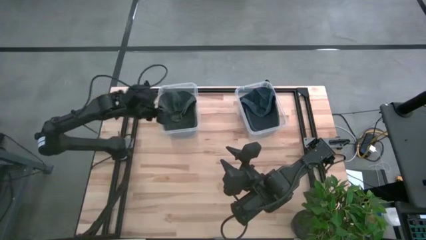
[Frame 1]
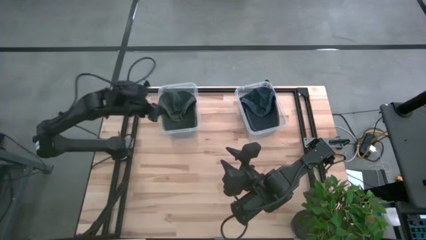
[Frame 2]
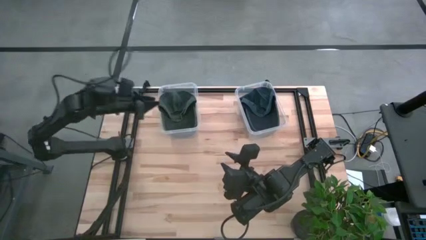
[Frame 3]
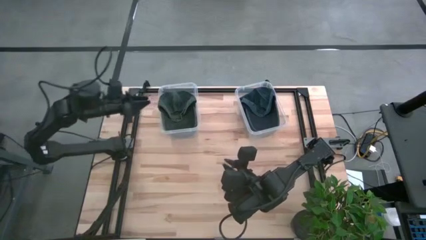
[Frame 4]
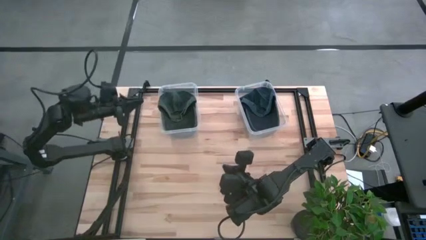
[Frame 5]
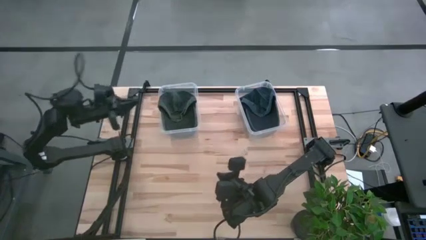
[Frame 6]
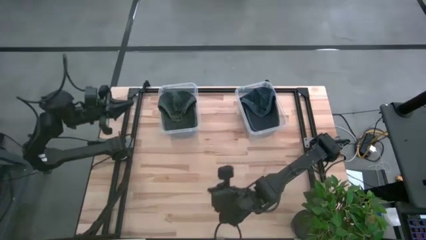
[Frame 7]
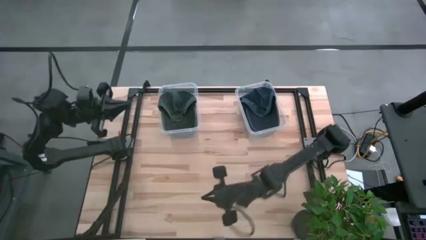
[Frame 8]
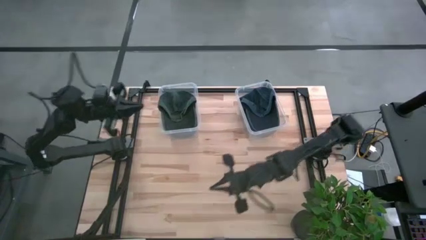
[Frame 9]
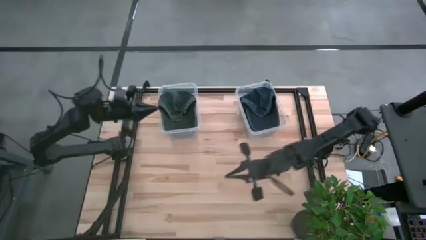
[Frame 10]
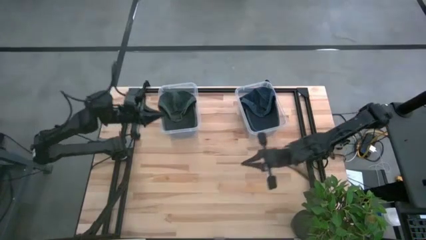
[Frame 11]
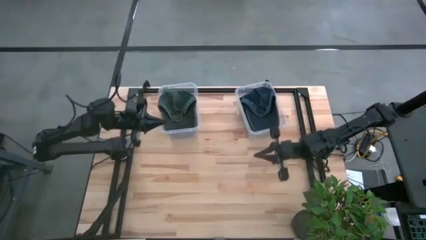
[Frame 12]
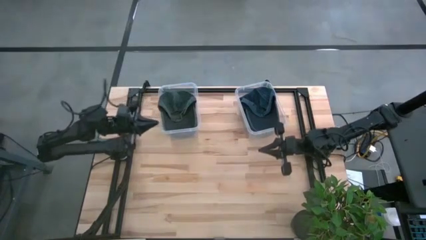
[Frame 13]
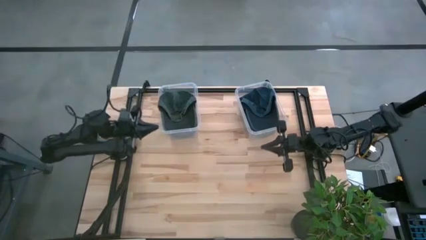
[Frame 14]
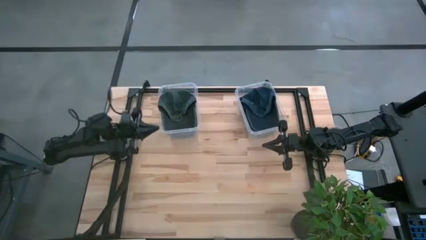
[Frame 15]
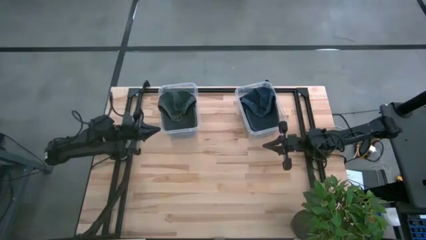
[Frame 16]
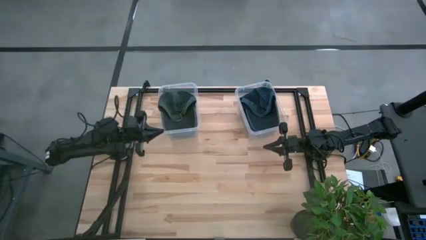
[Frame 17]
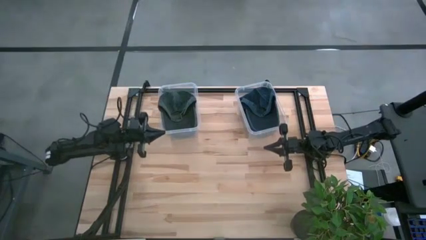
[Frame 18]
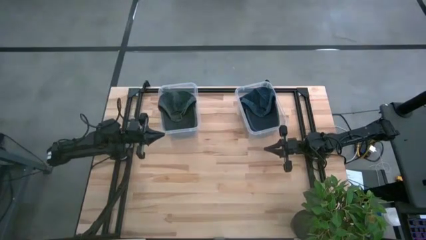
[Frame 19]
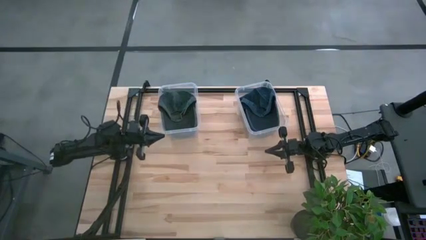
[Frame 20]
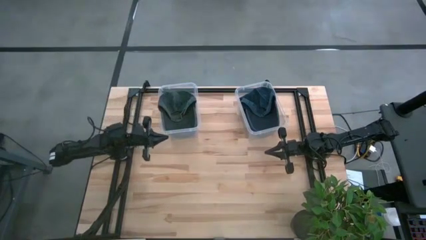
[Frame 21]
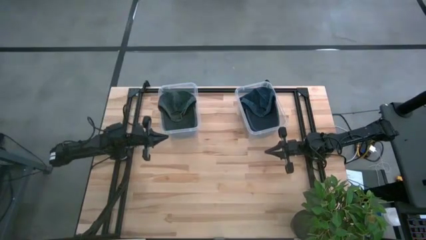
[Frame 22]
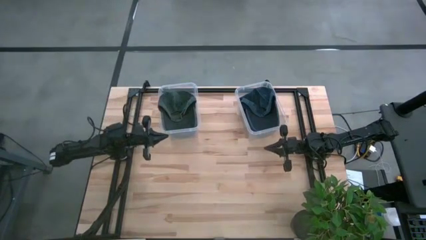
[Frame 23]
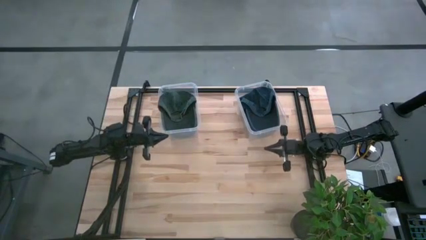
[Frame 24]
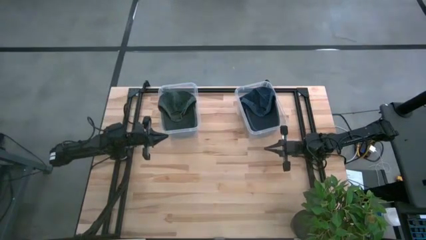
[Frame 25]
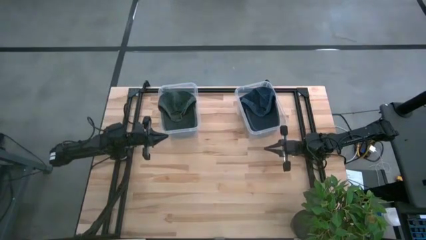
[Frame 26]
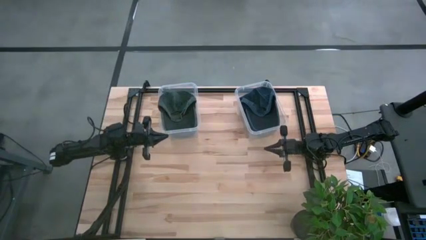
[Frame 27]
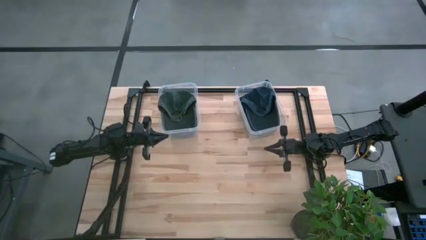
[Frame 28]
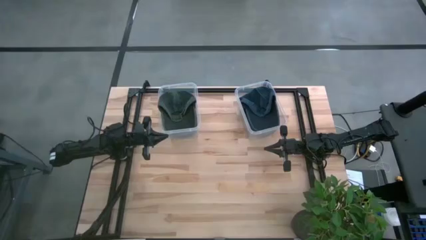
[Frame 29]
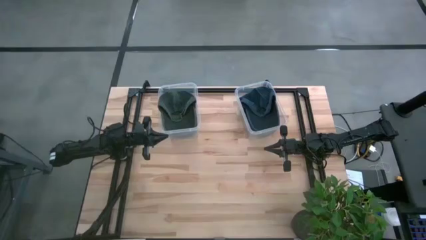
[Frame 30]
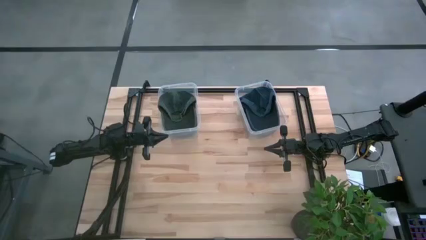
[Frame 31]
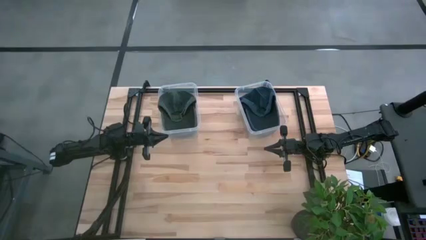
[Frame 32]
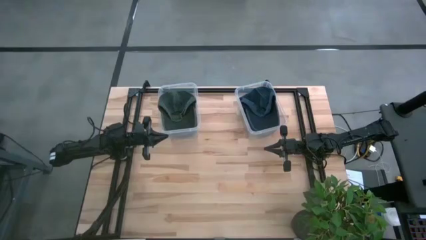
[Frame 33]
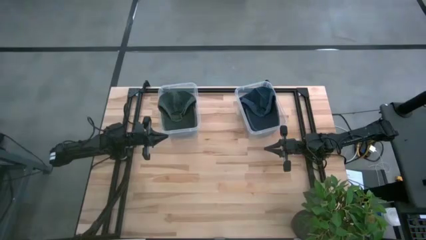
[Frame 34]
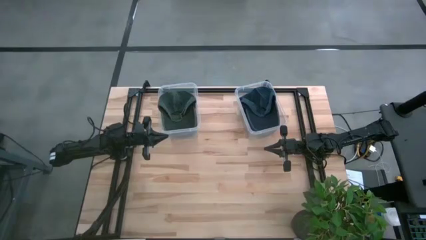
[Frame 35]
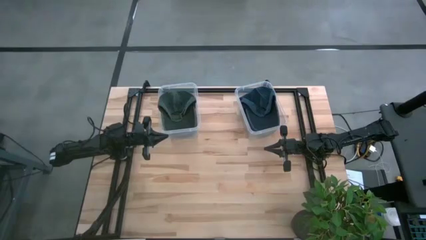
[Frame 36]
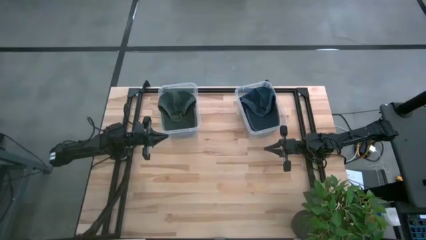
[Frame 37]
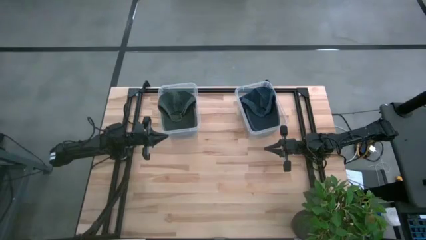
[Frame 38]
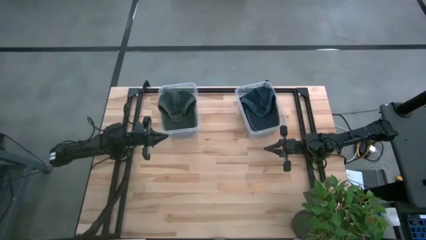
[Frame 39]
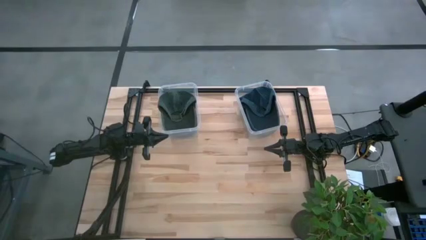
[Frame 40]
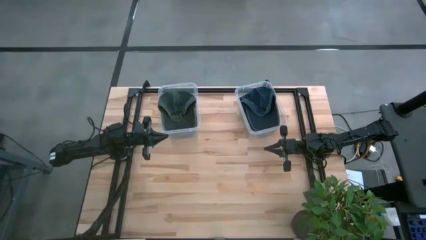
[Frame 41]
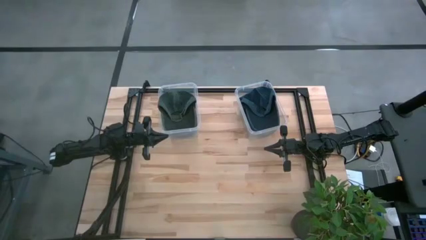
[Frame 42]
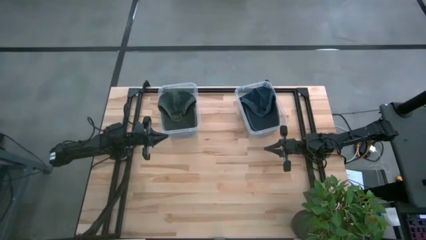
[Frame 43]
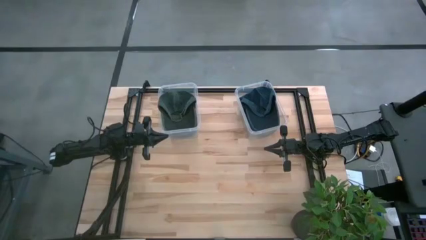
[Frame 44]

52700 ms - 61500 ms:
Task: Pick & Place hat
Return to Home Position

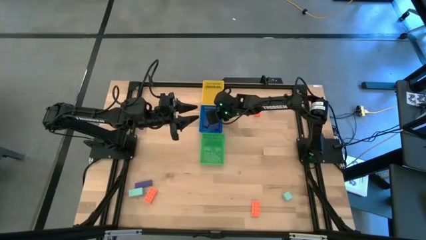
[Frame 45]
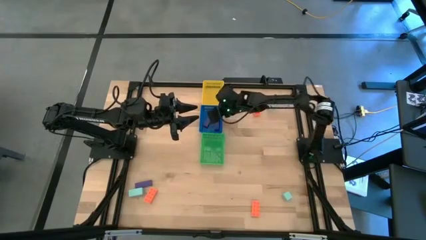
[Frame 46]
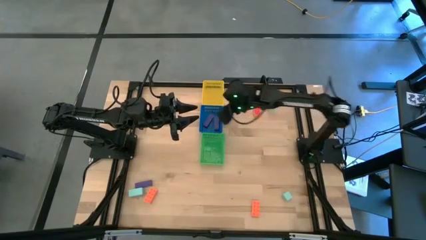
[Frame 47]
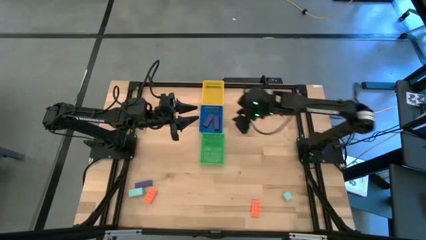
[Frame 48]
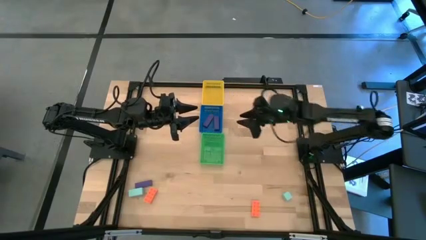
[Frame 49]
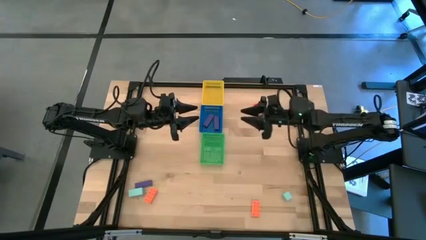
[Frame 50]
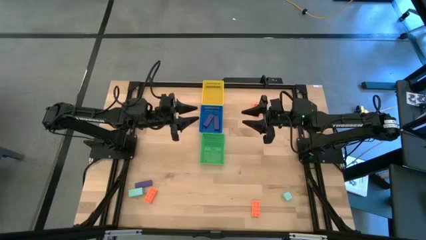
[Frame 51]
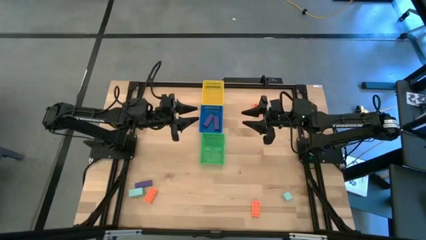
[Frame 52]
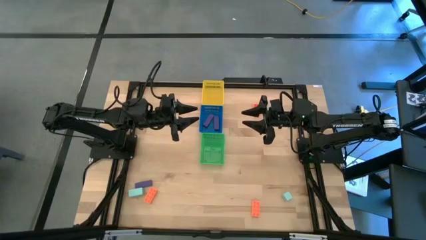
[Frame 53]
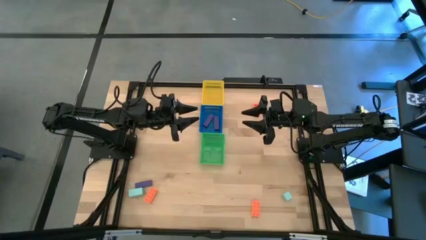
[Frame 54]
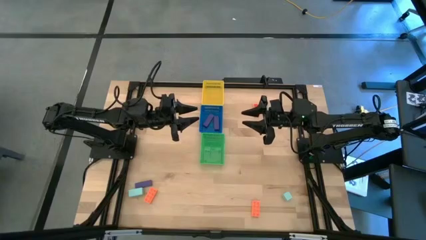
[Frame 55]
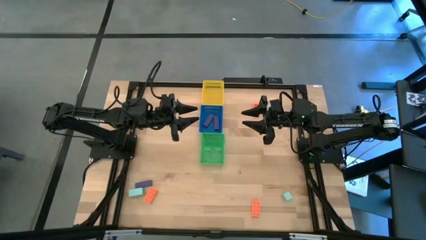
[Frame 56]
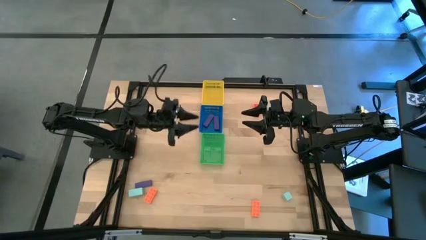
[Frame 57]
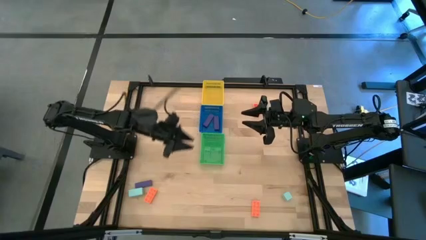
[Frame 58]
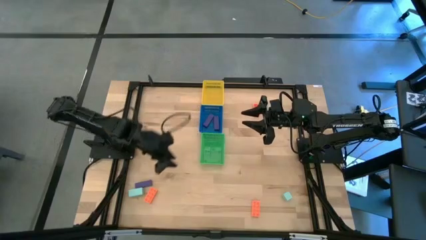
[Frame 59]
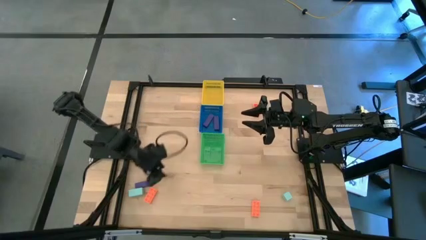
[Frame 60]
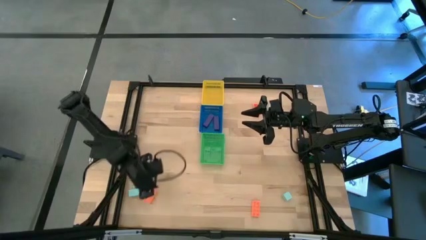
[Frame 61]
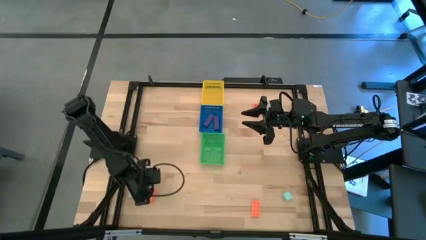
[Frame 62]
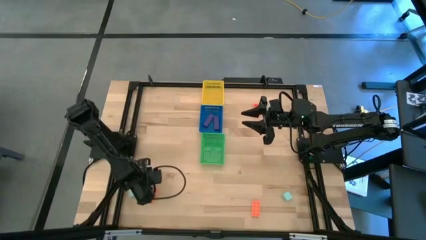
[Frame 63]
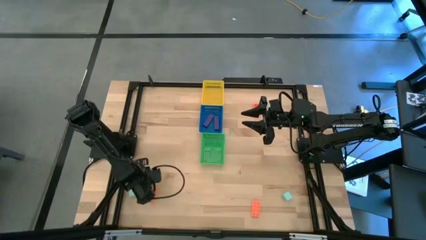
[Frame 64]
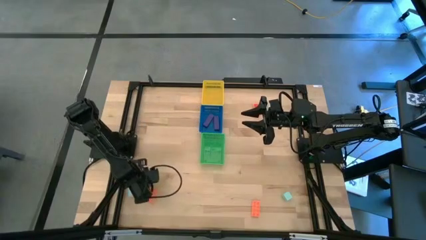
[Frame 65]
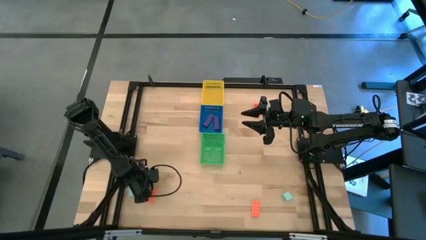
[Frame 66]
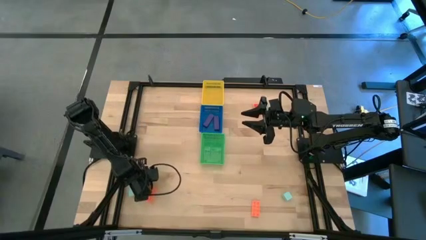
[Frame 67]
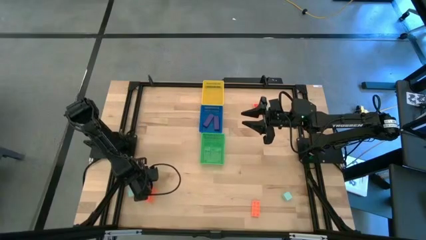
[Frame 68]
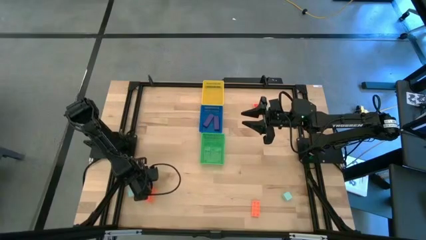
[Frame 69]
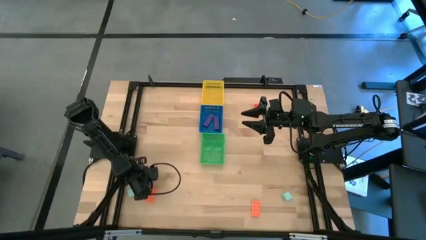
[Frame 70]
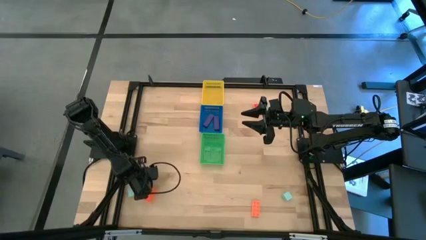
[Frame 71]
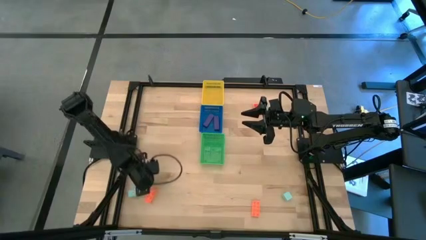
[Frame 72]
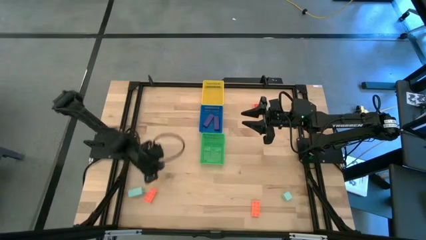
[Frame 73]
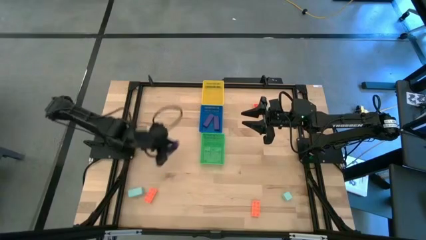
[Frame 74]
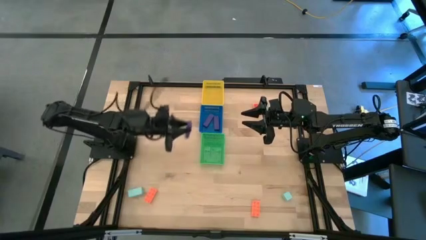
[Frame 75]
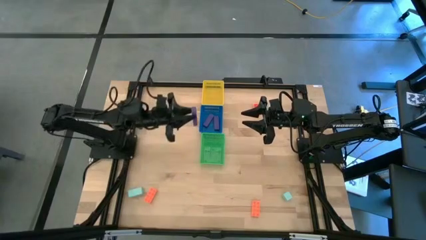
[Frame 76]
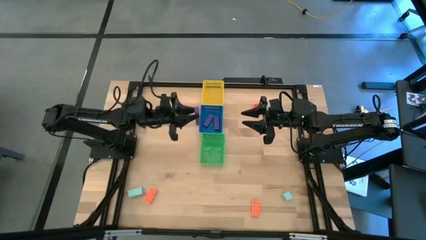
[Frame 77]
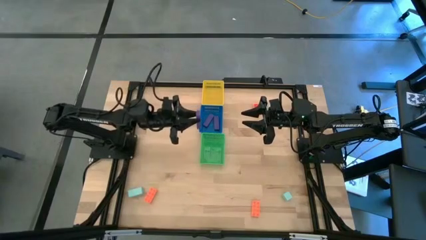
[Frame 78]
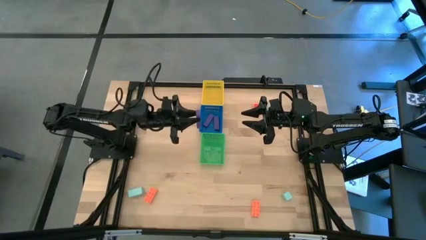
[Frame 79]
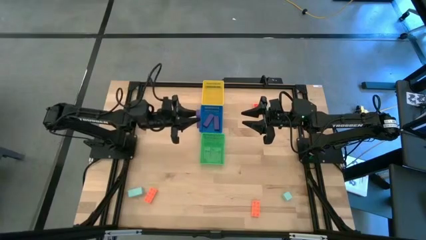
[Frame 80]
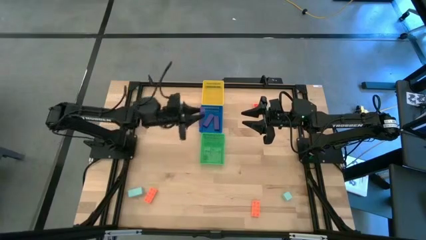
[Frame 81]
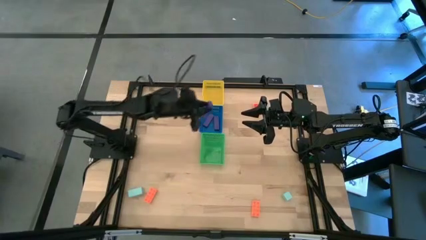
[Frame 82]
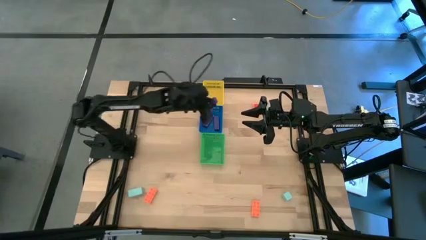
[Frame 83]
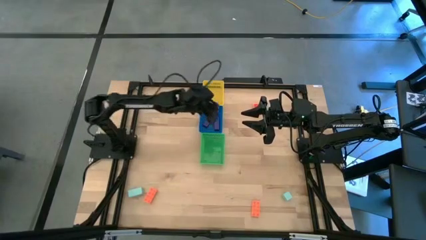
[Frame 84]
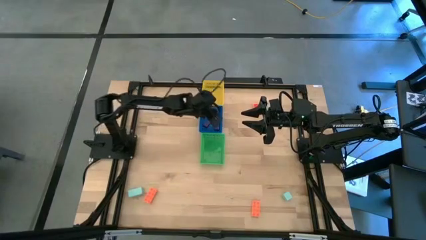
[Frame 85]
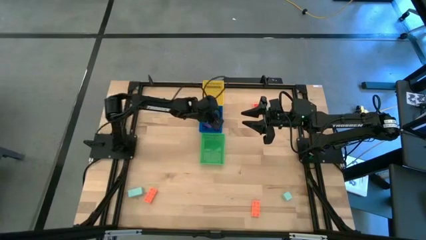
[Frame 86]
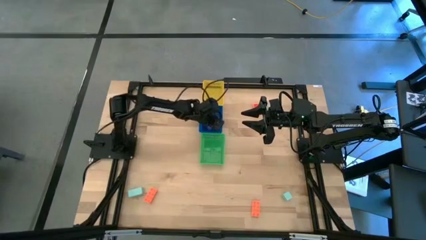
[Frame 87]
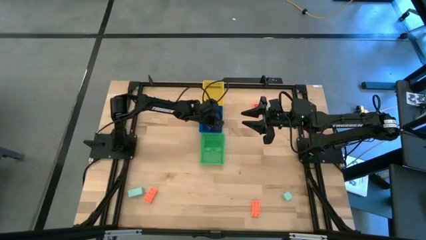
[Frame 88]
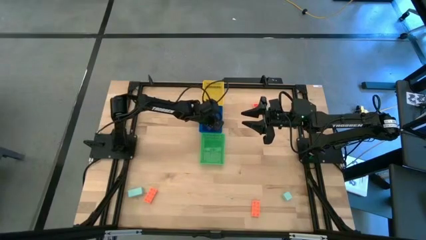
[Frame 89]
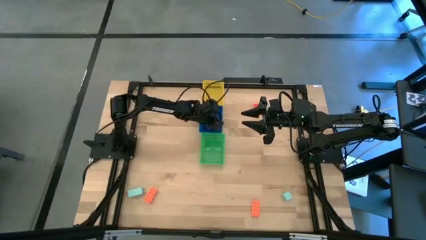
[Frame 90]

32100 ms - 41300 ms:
Task: Sort & place blocks by color
Put the violet block into the blue basket
